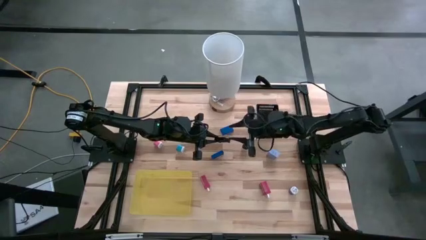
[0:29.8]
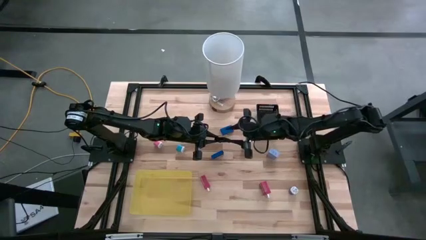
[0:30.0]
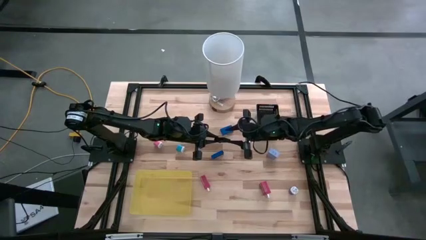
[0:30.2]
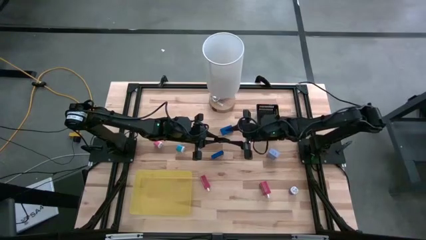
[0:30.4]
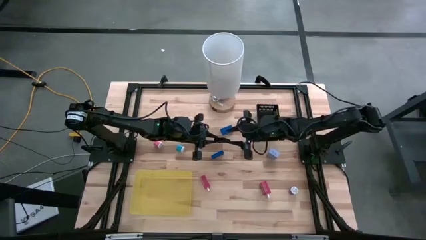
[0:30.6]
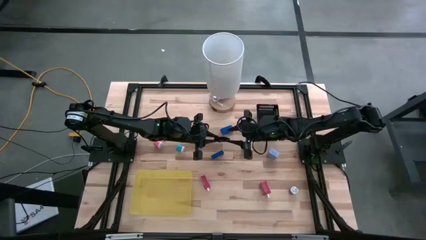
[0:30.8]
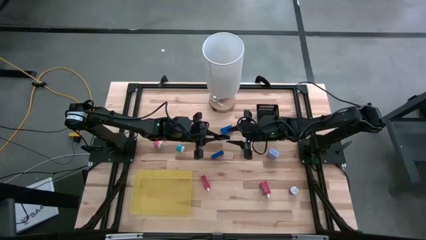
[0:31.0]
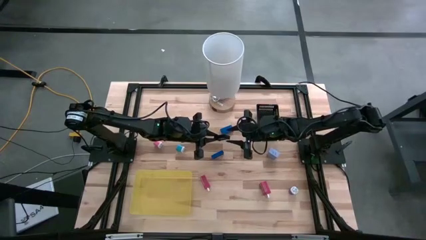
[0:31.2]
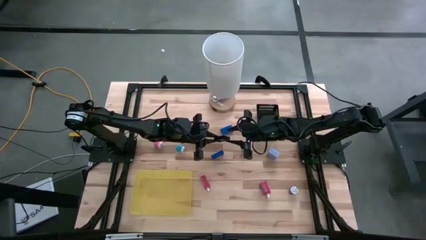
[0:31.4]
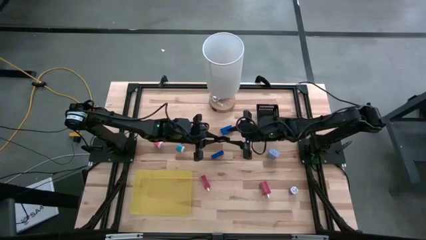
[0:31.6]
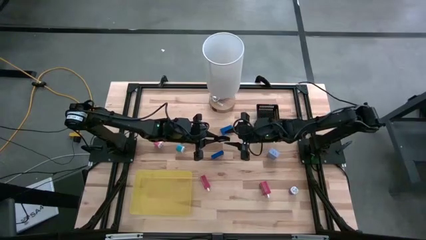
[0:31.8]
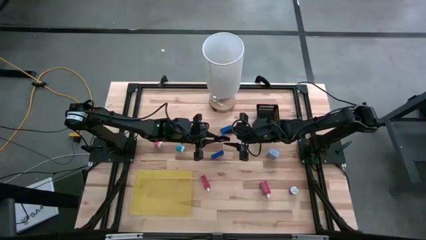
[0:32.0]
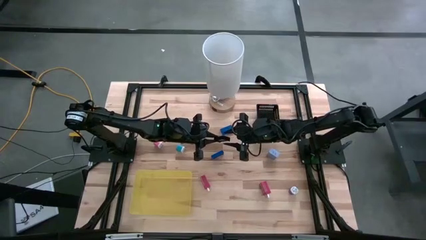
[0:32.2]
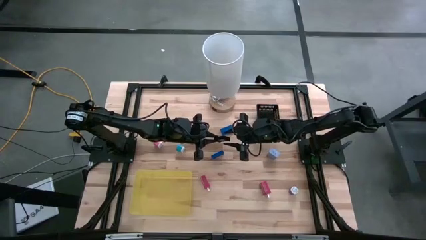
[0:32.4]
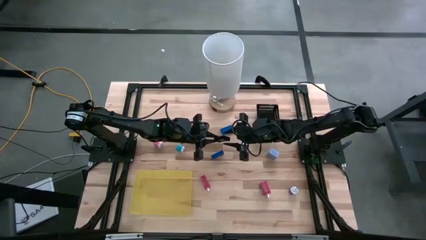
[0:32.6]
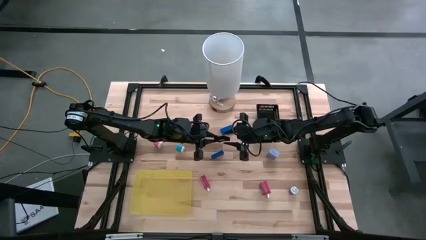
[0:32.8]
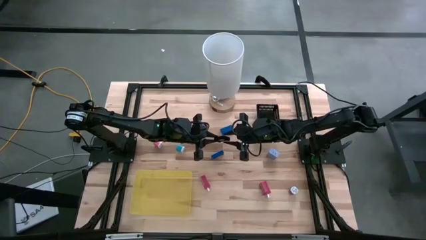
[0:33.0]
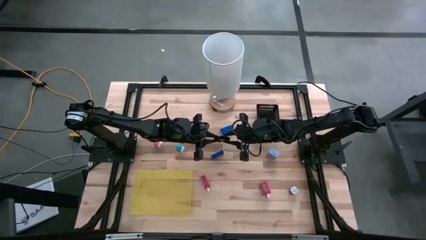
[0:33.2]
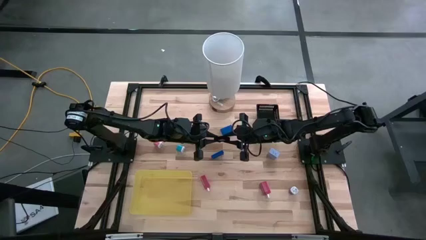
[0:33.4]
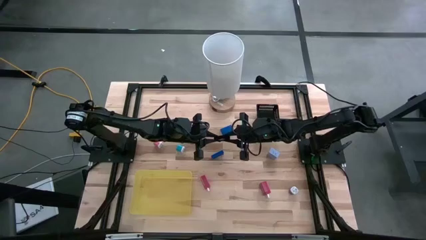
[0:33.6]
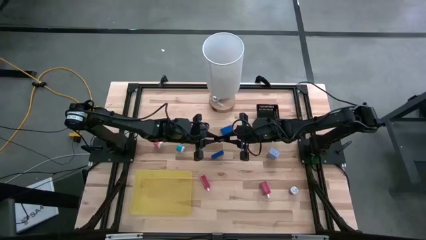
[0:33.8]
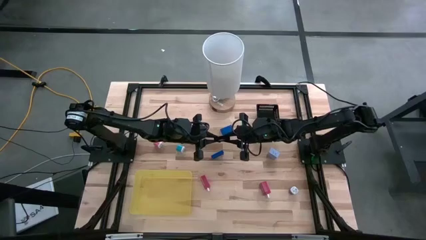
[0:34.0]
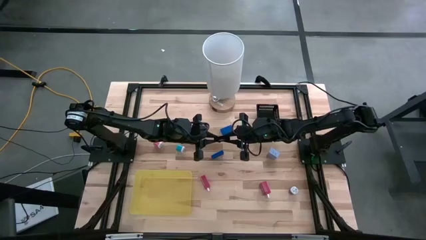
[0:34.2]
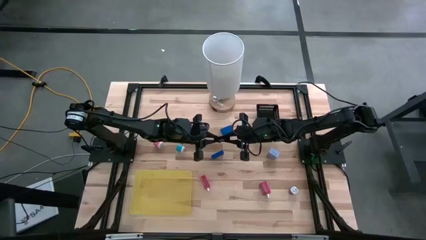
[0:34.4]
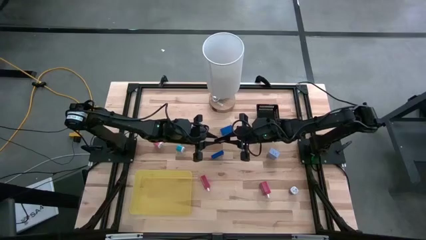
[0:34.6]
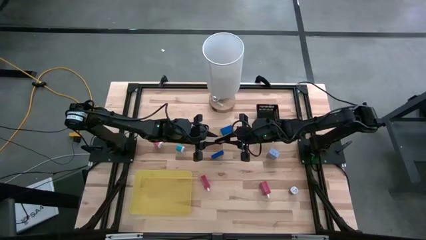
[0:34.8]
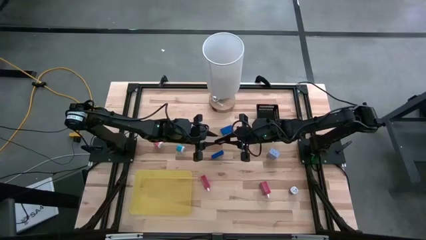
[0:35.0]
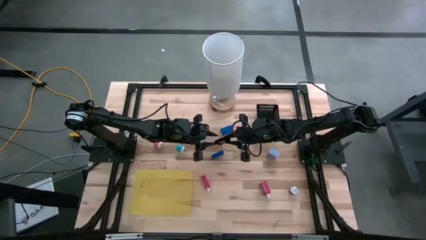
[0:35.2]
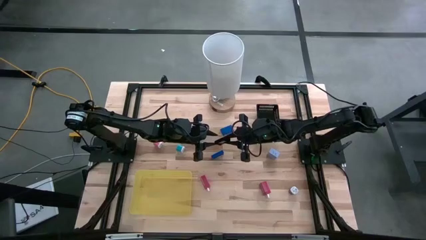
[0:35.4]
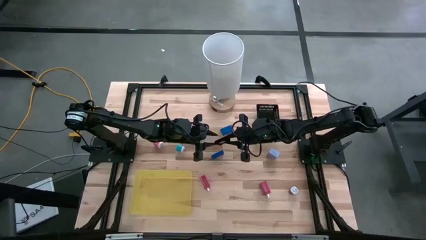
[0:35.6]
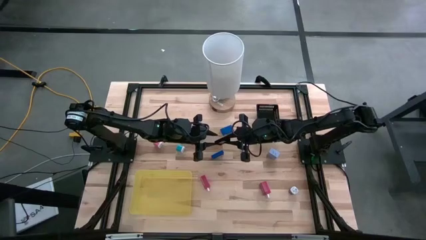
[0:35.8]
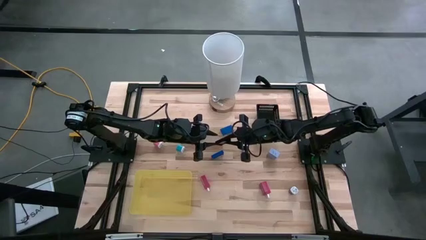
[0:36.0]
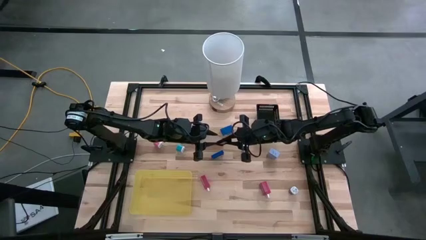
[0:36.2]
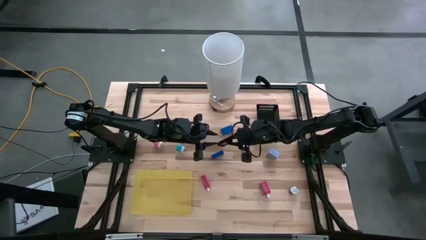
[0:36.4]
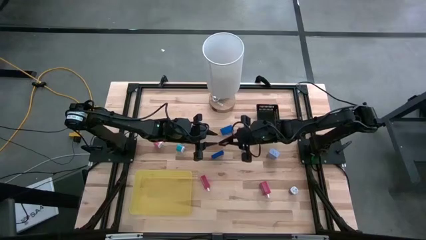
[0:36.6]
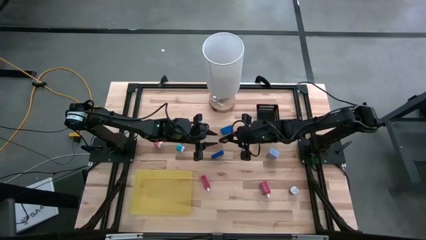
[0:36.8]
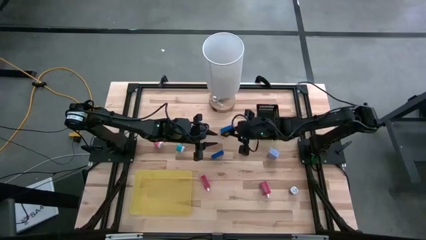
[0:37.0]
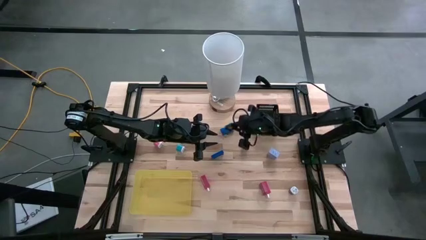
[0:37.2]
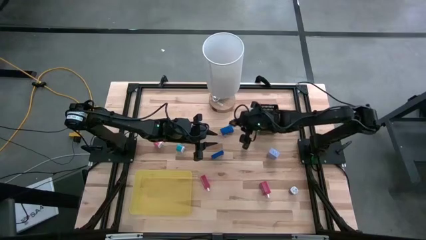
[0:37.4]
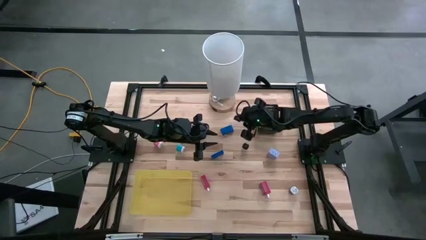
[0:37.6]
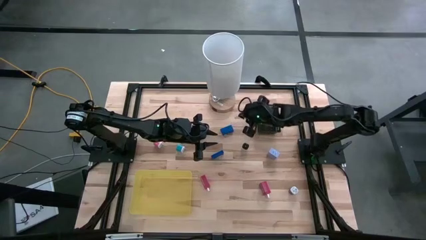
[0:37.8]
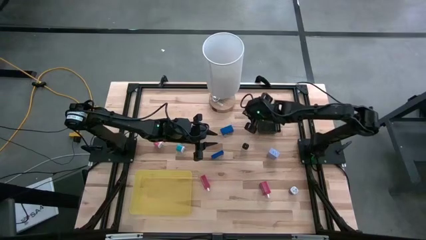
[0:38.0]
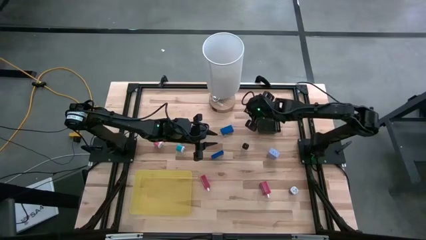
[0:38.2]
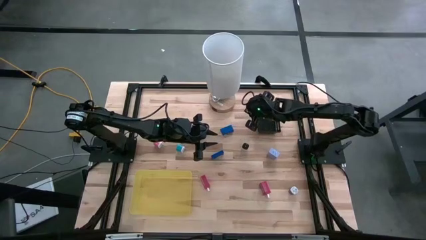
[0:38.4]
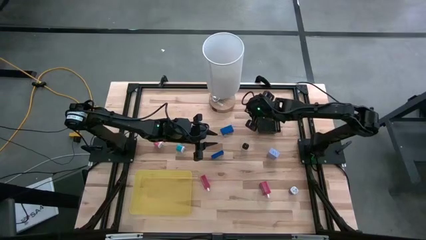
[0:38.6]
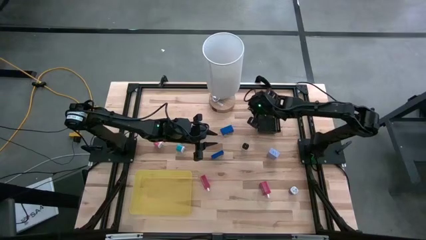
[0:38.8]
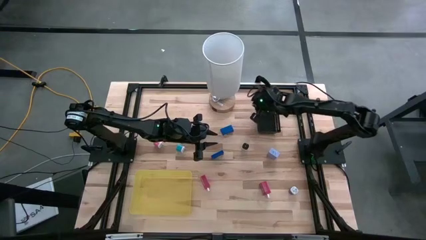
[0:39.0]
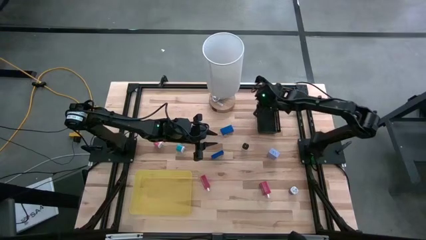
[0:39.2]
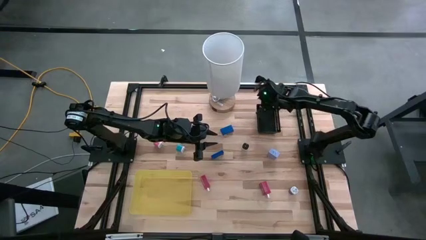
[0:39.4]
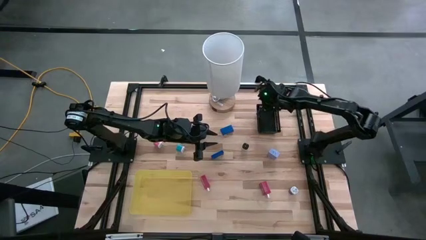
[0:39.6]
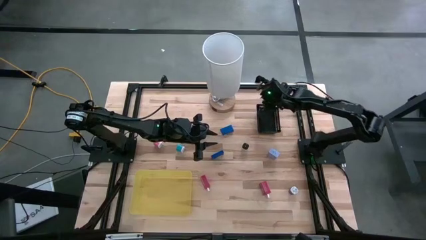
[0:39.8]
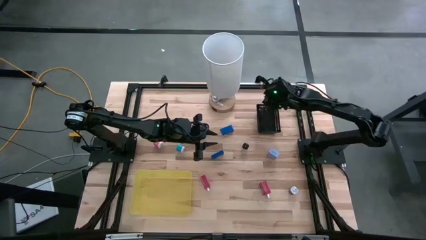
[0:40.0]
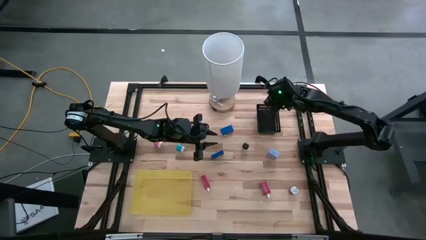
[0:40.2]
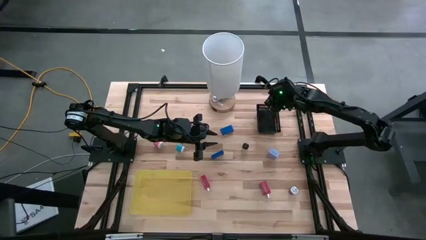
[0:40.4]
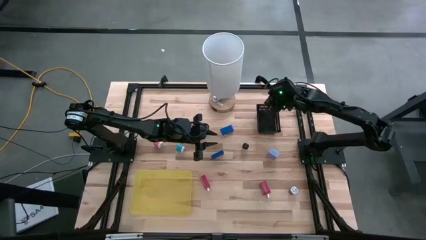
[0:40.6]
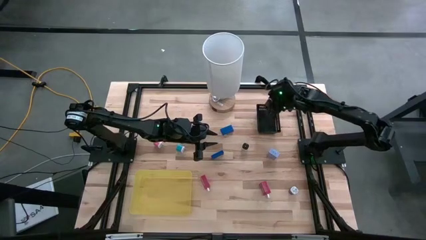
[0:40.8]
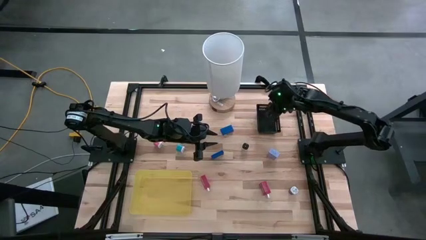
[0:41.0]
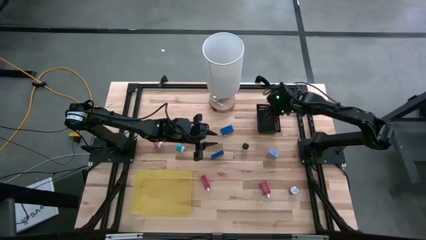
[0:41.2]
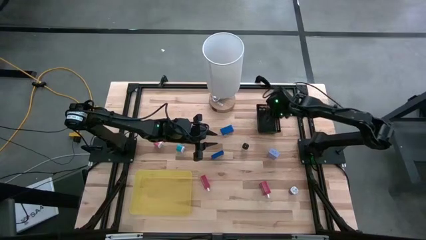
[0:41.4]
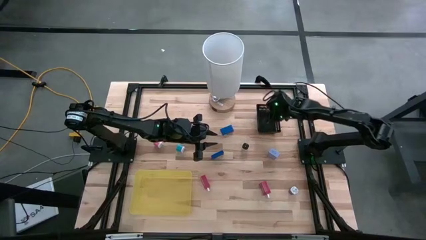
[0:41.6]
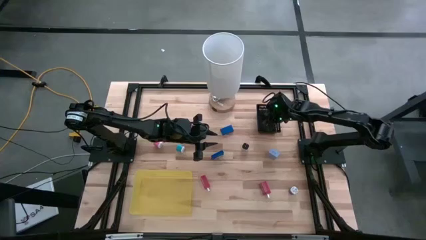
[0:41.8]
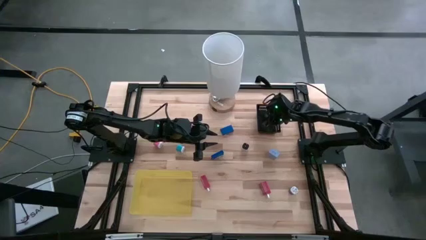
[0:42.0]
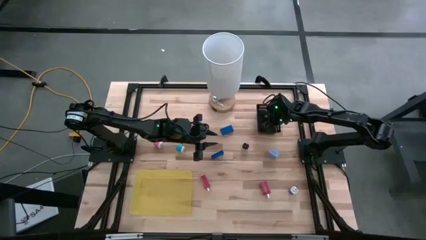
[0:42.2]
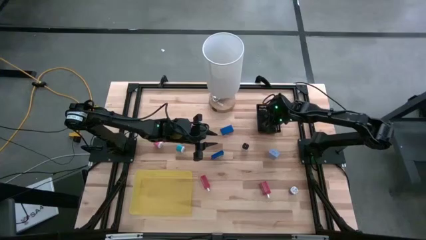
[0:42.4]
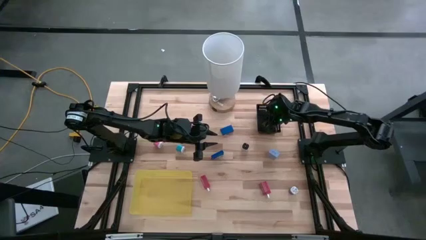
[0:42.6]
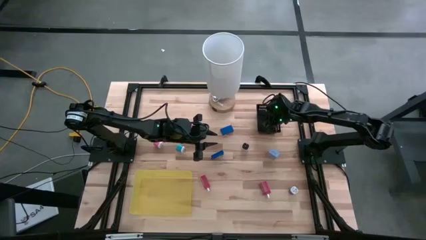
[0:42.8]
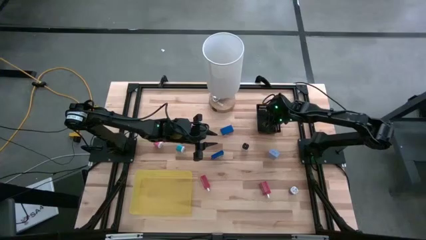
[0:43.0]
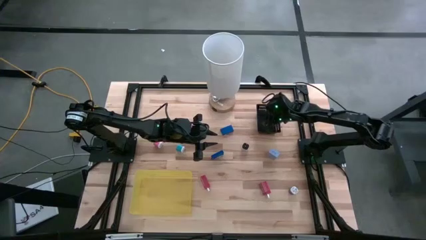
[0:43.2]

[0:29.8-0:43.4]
Task: Pick & Place Office items
Put the black digital clock into the black bin
